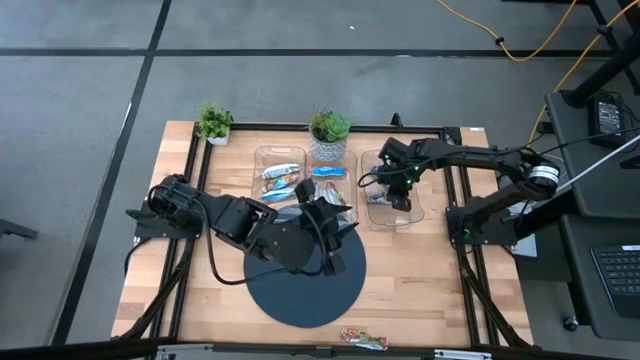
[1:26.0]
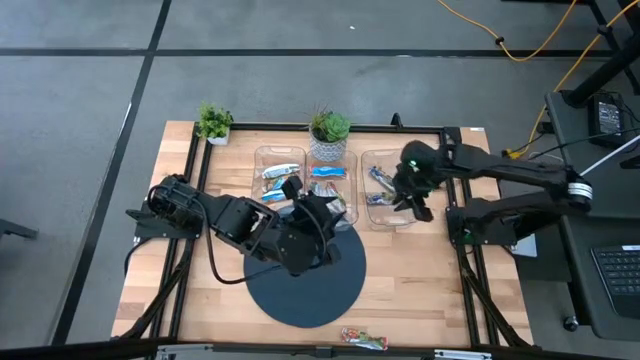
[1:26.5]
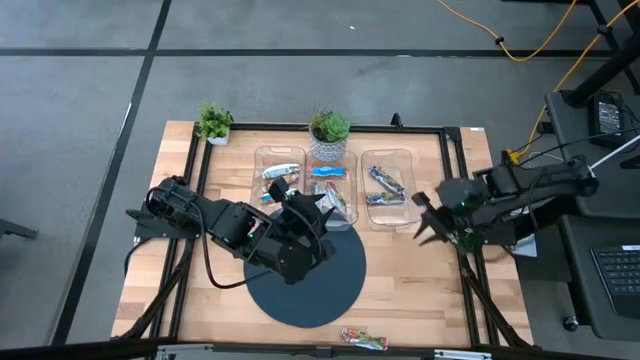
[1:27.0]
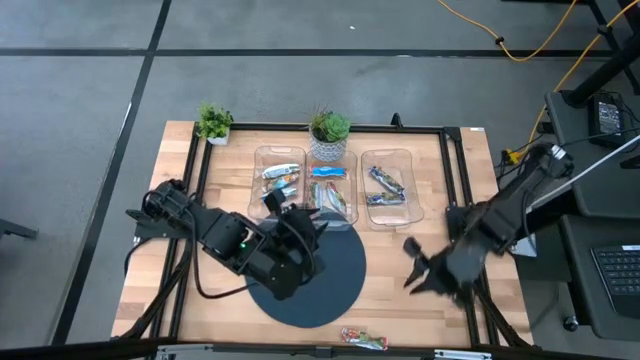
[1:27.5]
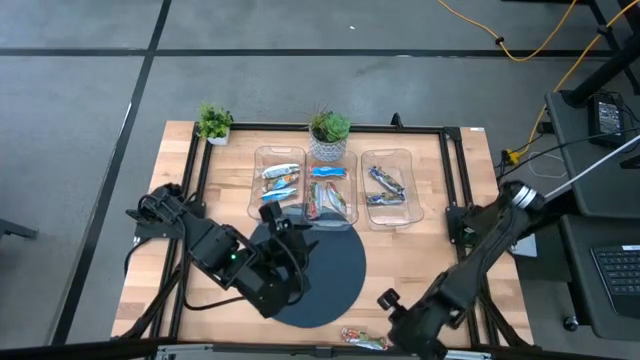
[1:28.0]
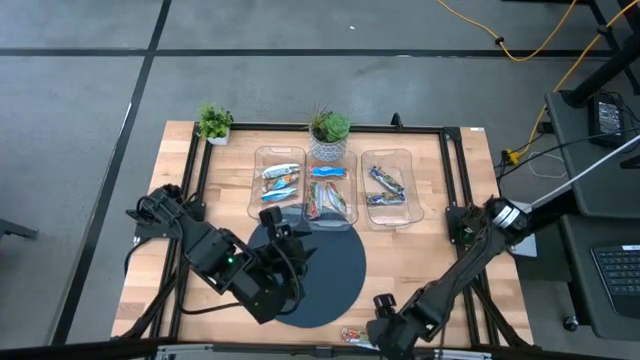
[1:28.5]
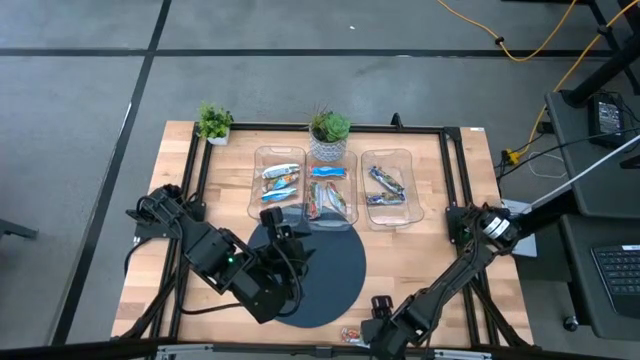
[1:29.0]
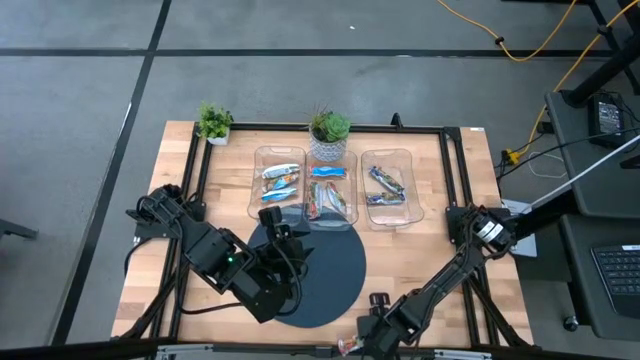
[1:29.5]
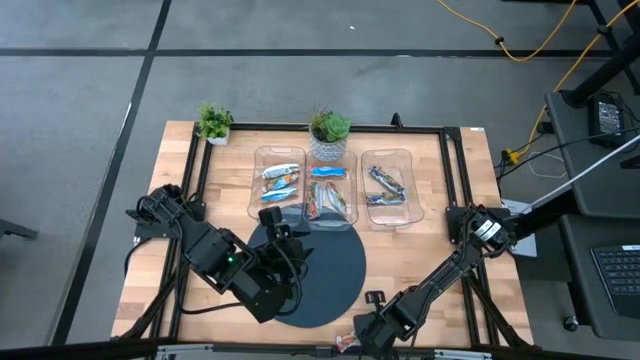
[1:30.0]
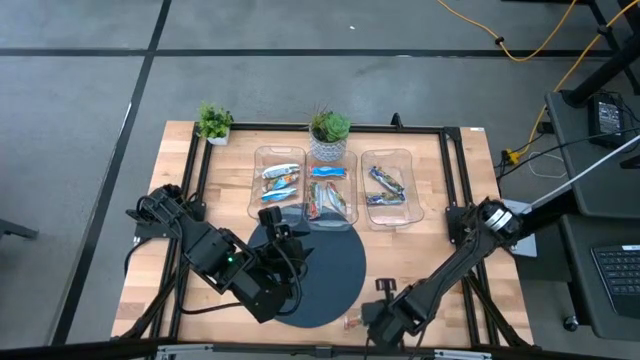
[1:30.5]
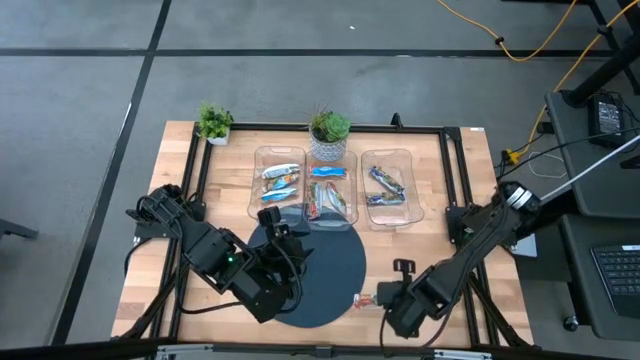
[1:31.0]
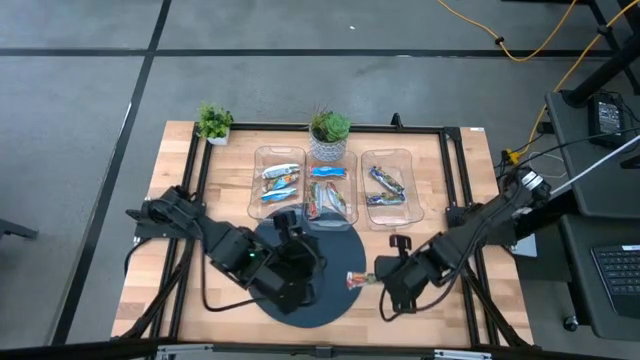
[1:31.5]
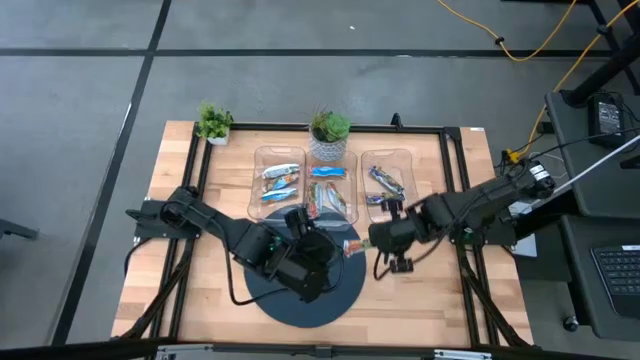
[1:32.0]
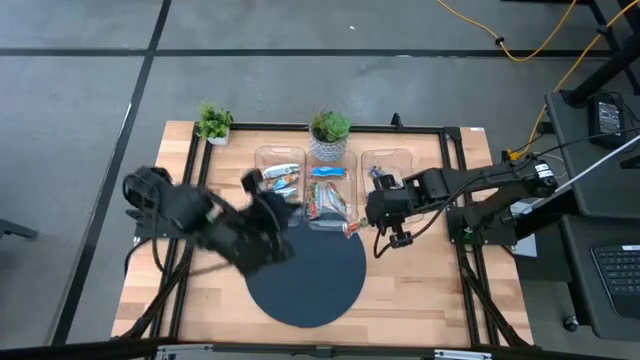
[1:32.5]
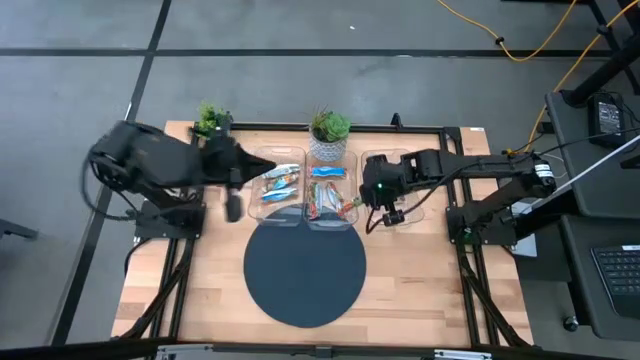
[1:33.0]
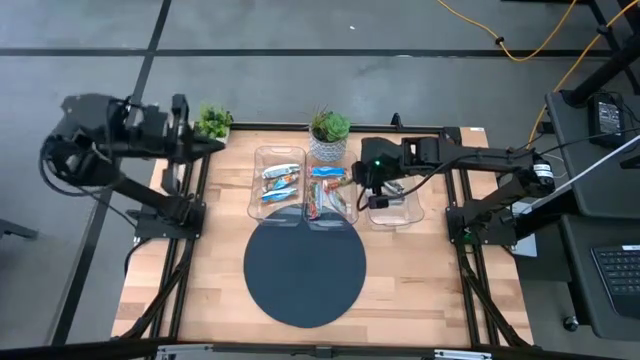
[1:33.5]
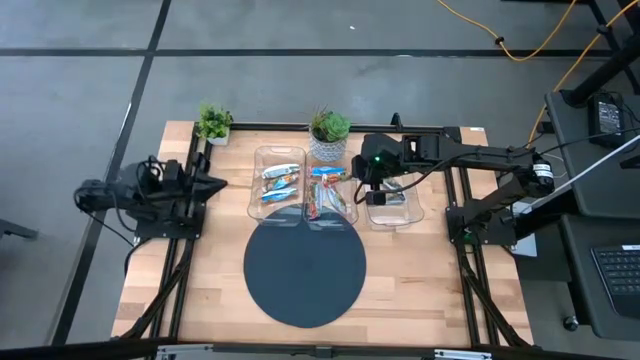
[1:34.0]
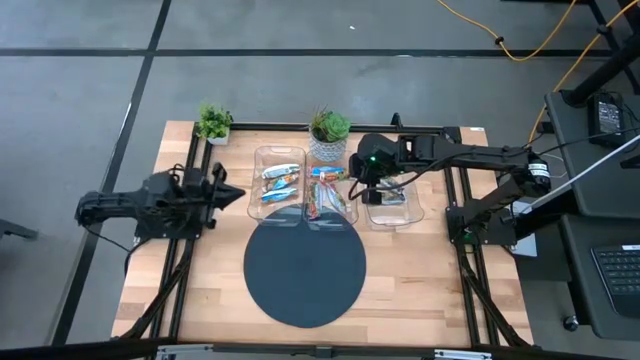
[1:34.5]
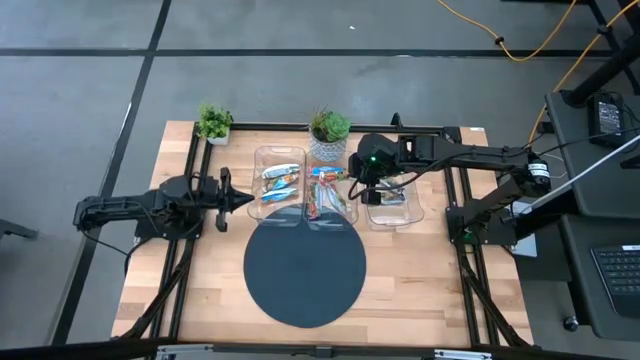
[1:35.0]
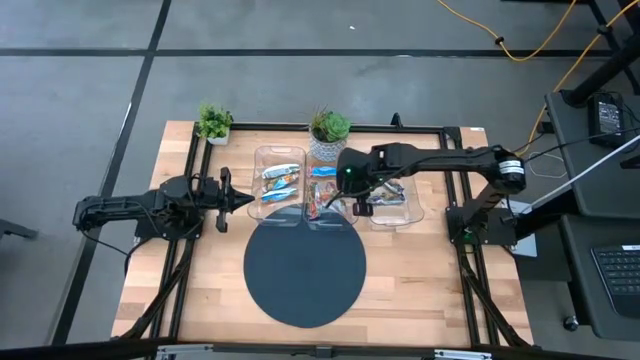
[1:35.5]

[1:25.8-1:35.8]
Task: Pick and place Granola Bars by type
Put the red granola bar into the middle transparent bin

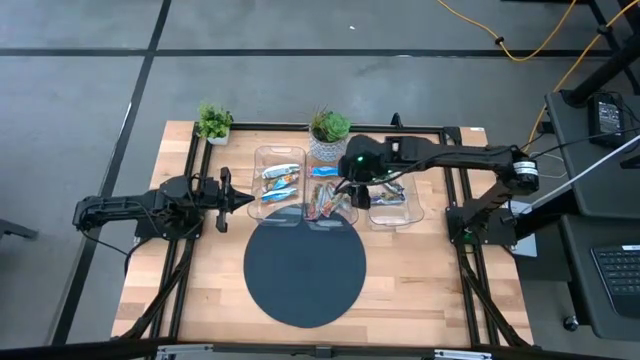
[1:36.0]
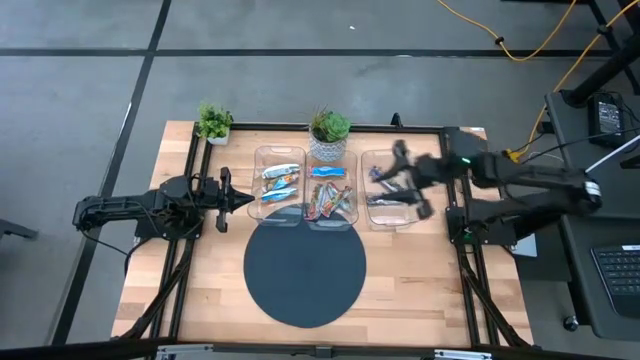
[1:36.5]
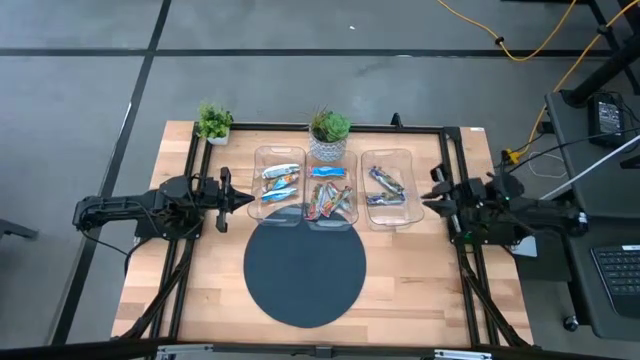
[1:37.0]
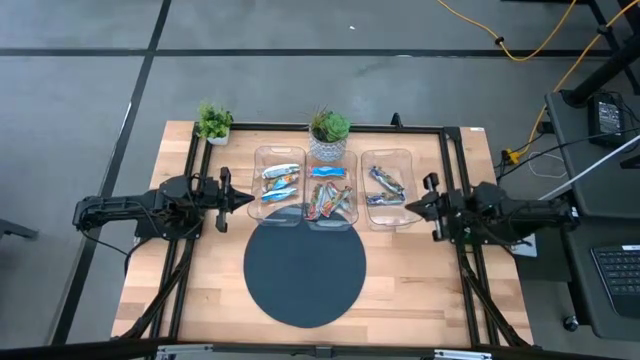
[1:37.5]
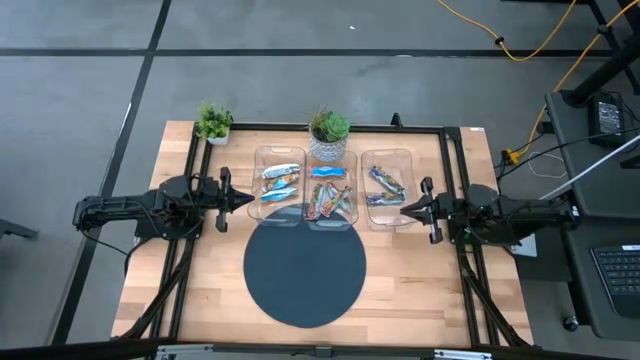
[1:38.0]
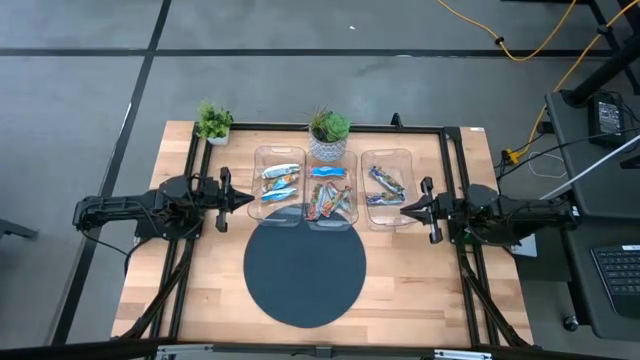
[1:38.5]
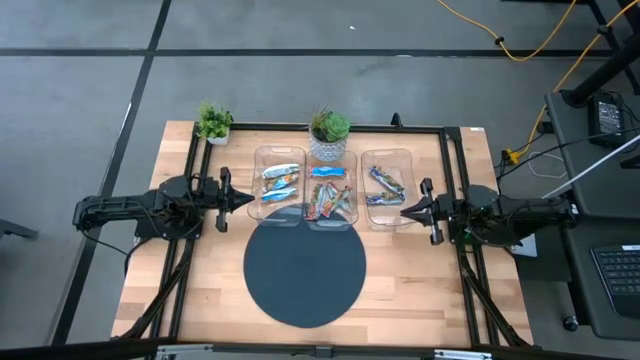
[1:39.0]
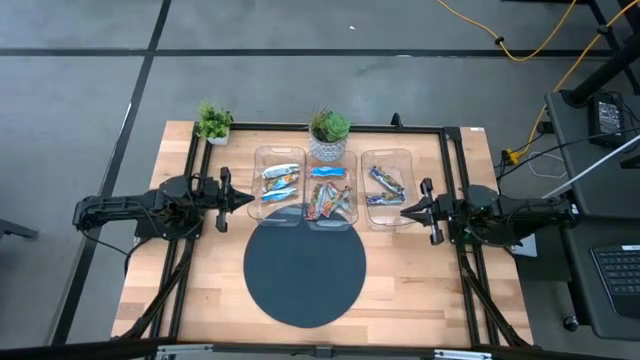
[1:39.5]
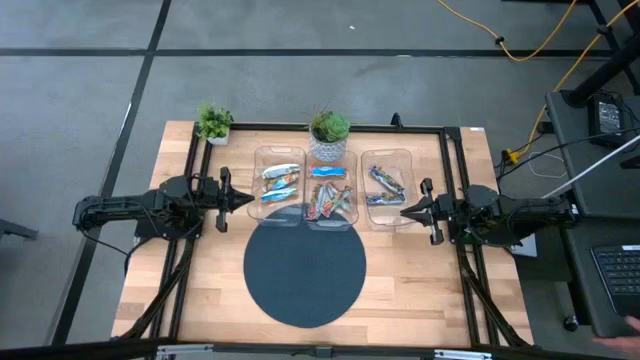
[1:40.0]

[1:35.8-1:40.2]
Return to Home Position

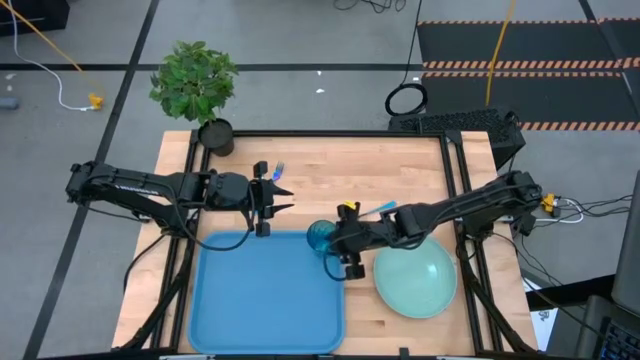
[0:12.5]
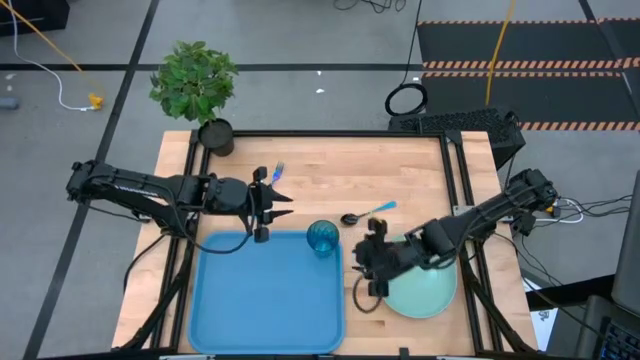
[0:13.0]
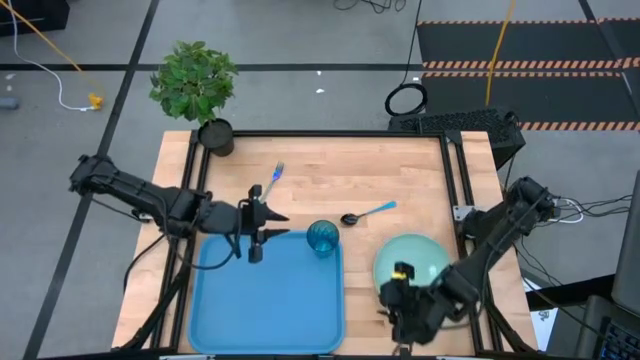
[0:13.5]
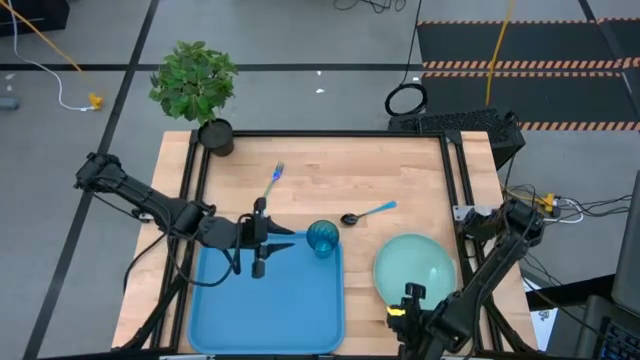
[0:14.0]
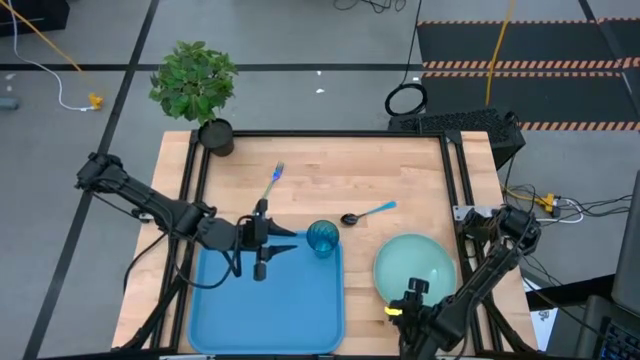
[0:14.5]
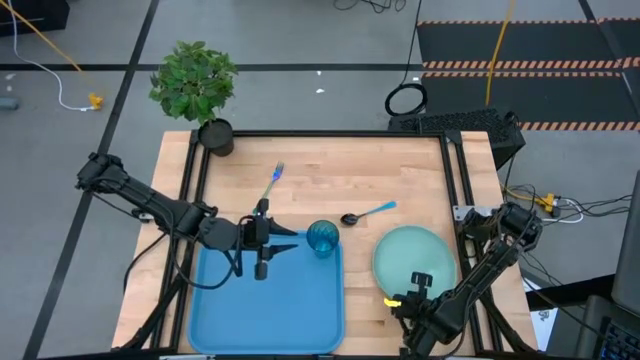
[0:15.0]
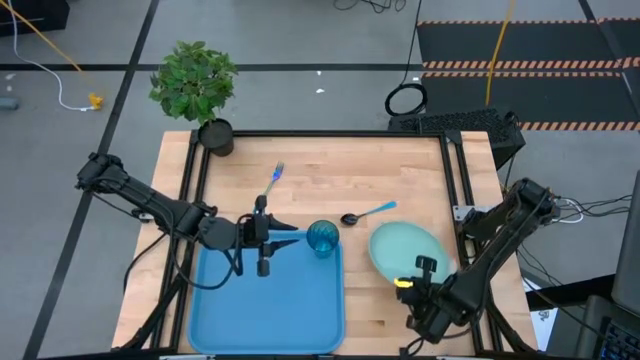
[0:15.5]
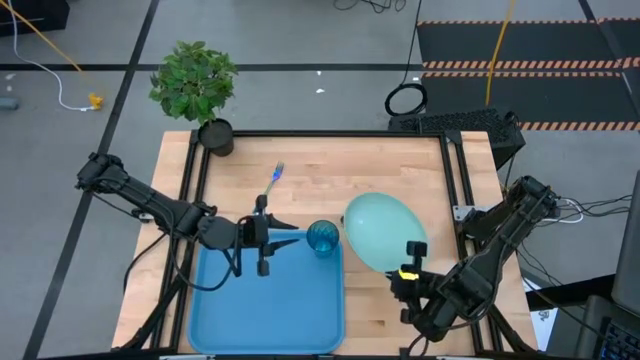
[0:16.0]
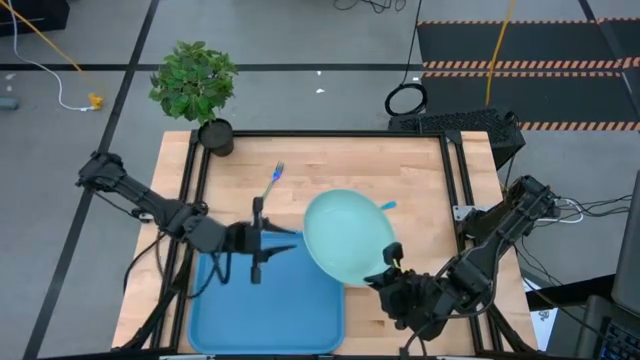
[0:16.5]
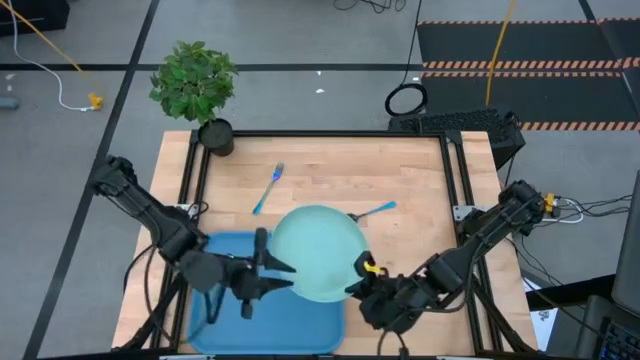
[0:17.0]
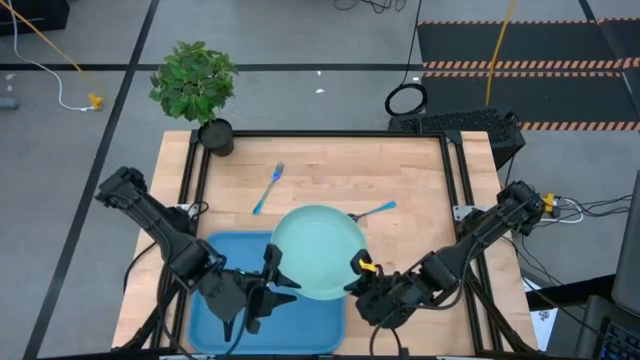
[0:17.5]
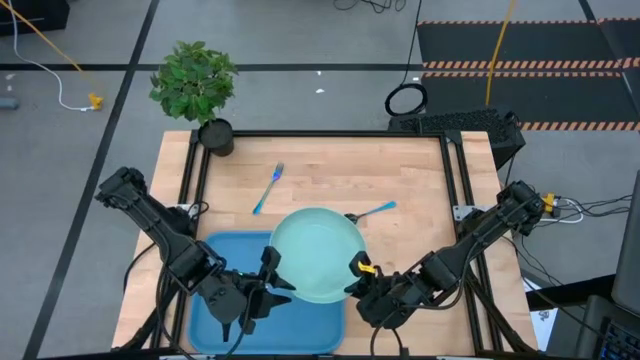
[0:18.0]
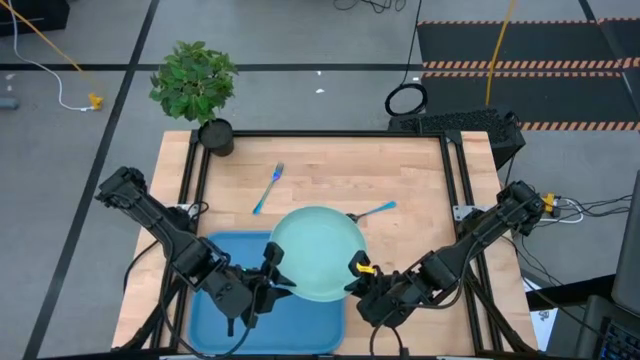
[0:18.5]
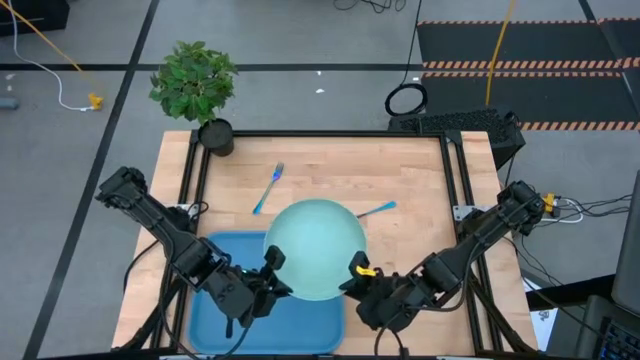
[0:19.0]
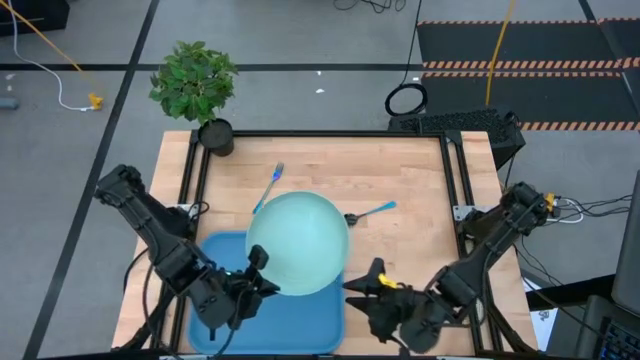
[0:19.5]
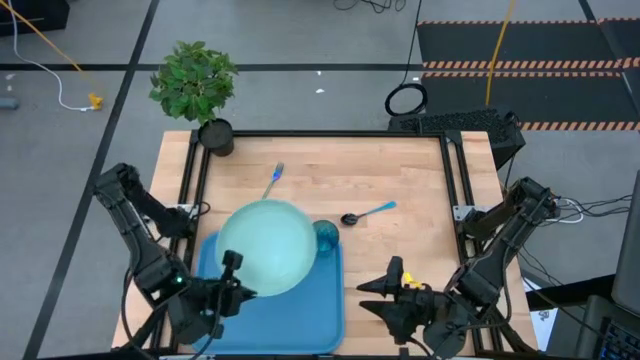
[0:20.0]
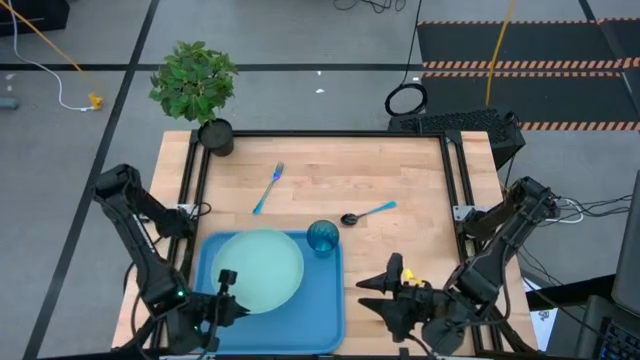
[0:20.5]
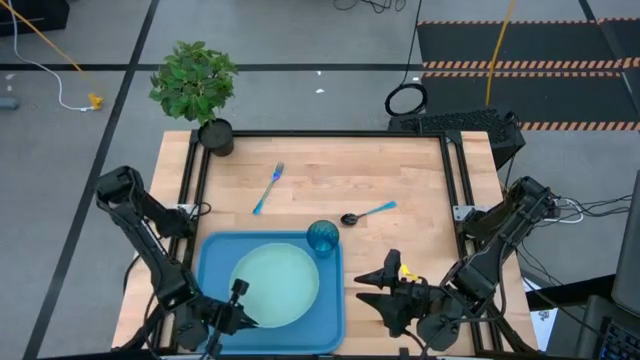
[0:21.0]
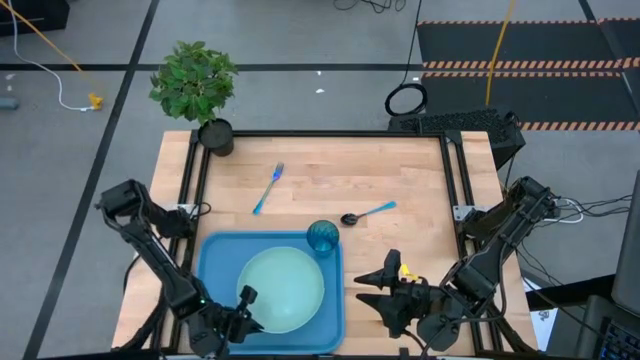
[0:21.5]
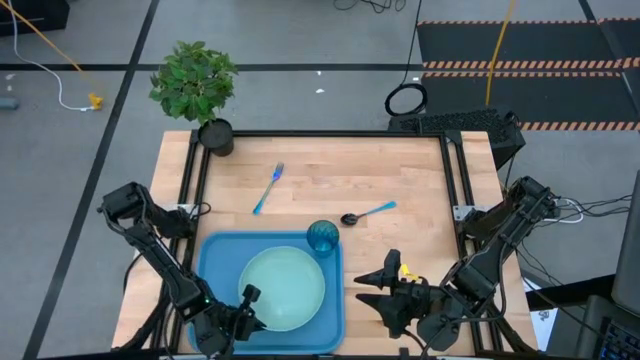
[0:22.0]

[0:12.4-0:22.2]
Task: Pick and place plate/cup/fork/spoon on tray
Put the white plate on the blue tray
